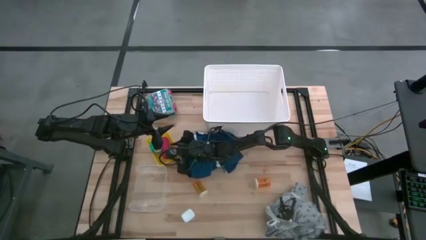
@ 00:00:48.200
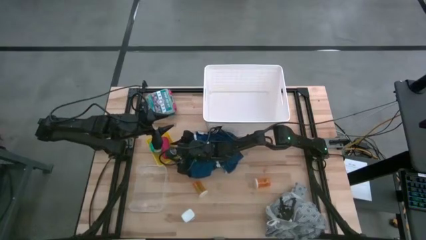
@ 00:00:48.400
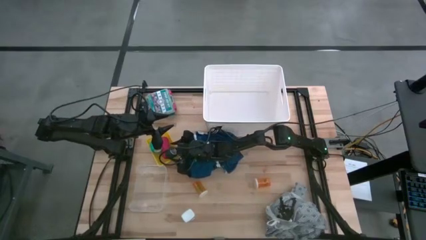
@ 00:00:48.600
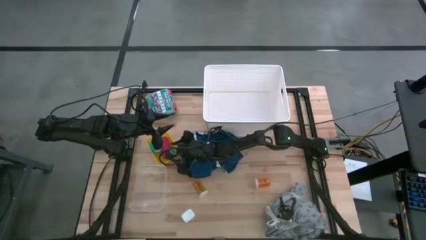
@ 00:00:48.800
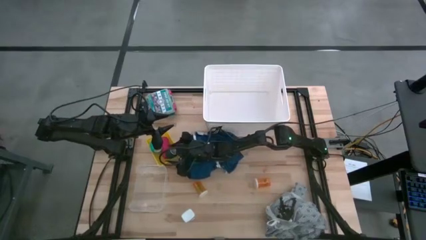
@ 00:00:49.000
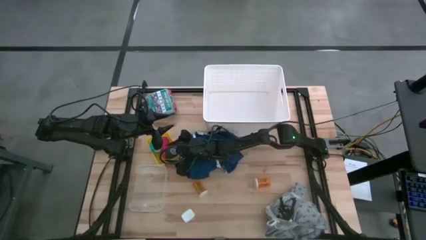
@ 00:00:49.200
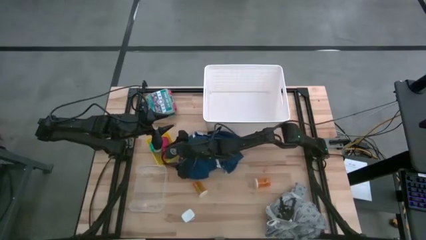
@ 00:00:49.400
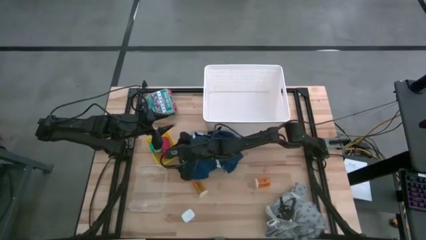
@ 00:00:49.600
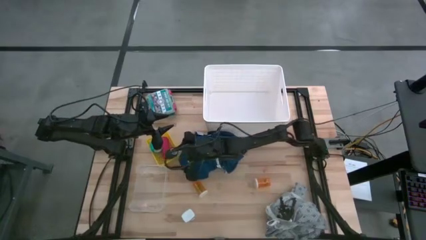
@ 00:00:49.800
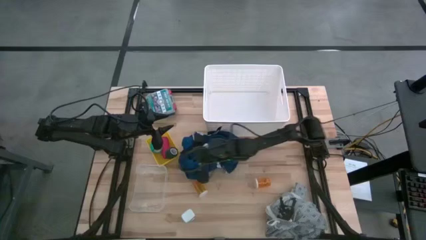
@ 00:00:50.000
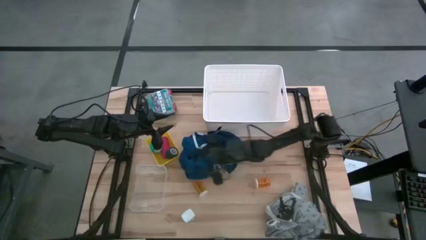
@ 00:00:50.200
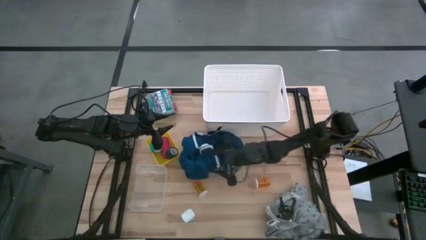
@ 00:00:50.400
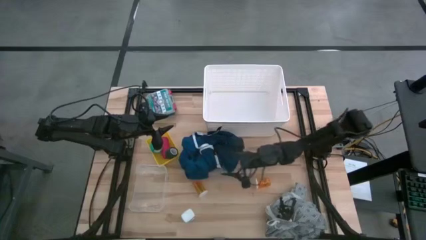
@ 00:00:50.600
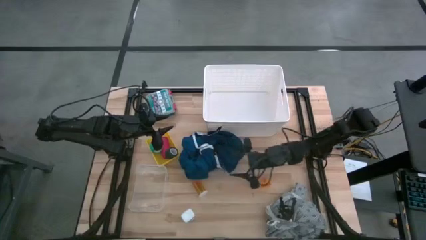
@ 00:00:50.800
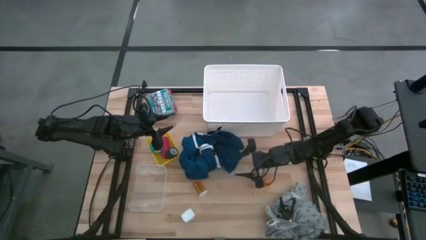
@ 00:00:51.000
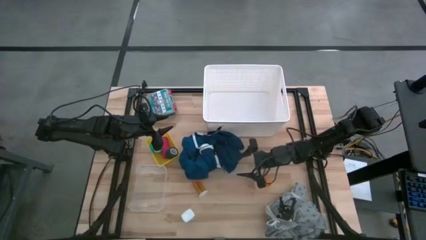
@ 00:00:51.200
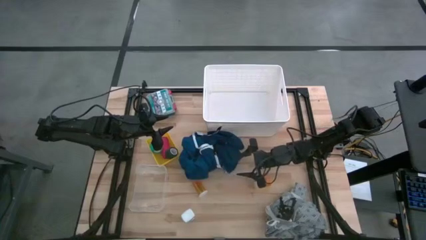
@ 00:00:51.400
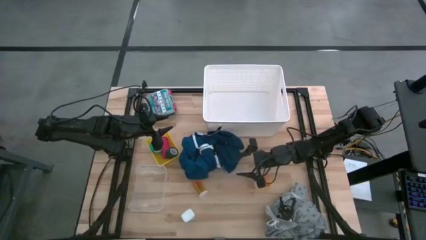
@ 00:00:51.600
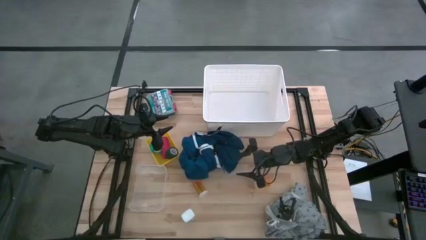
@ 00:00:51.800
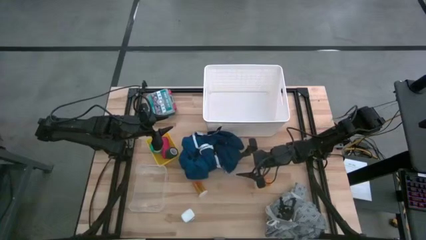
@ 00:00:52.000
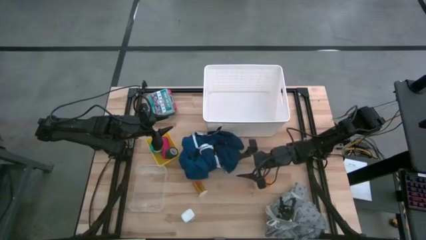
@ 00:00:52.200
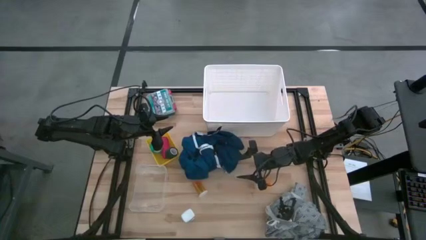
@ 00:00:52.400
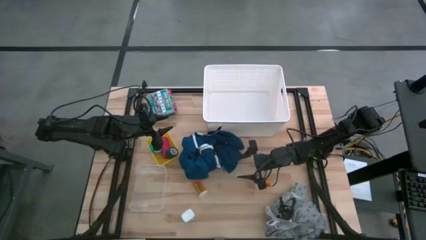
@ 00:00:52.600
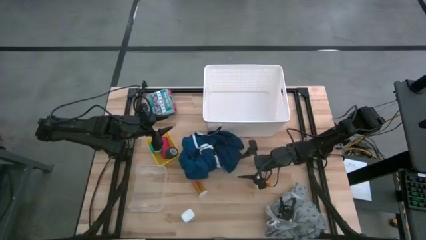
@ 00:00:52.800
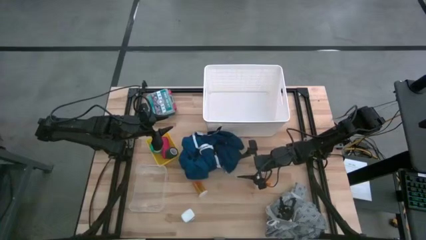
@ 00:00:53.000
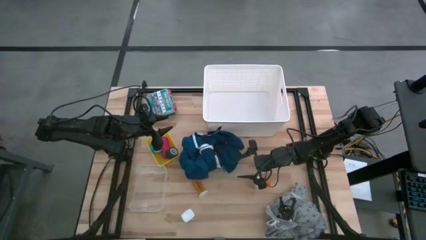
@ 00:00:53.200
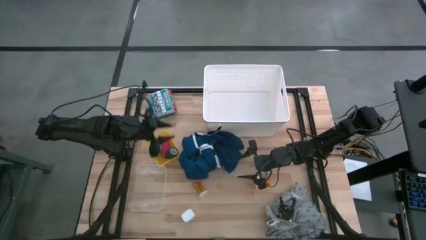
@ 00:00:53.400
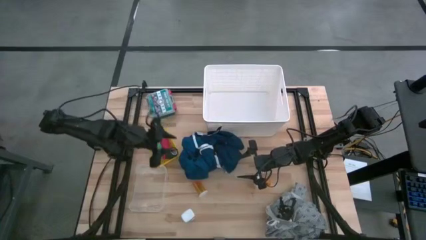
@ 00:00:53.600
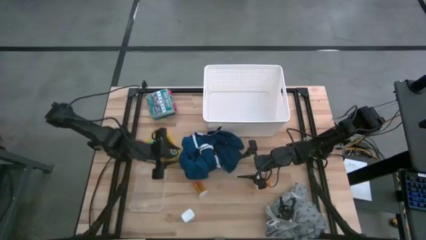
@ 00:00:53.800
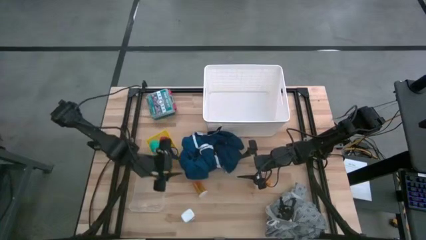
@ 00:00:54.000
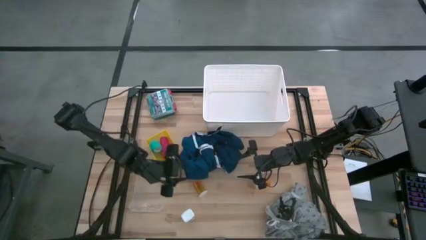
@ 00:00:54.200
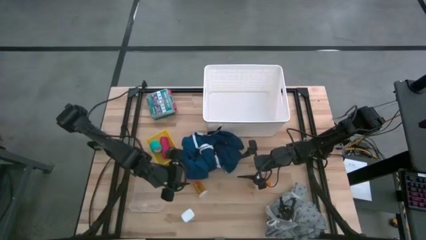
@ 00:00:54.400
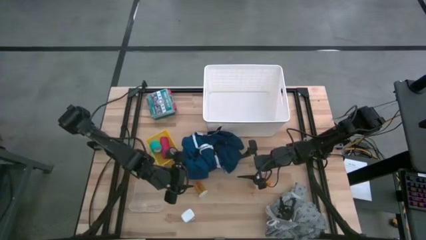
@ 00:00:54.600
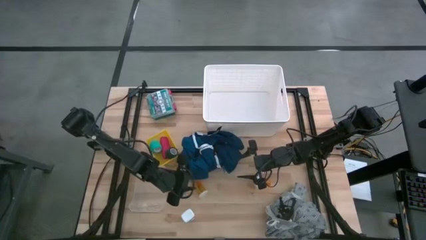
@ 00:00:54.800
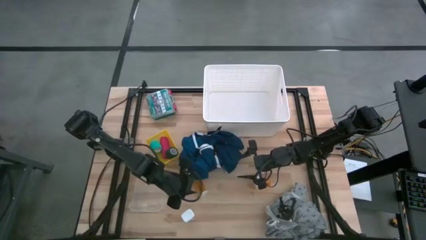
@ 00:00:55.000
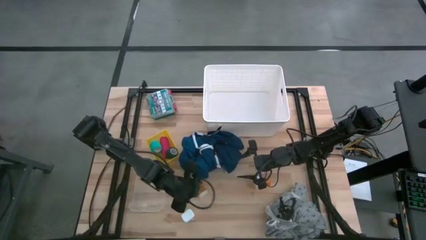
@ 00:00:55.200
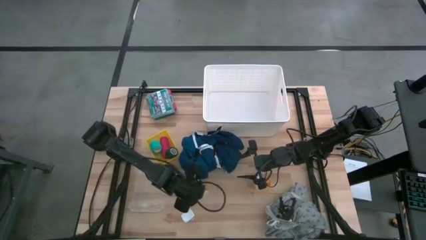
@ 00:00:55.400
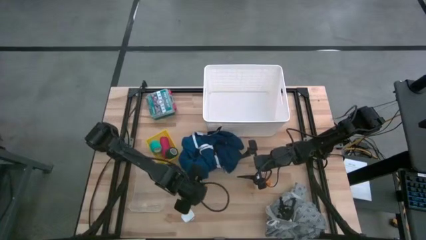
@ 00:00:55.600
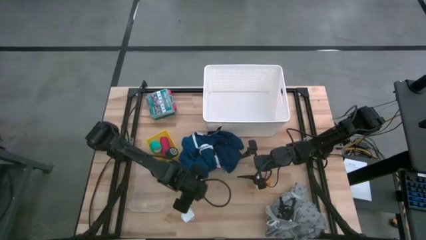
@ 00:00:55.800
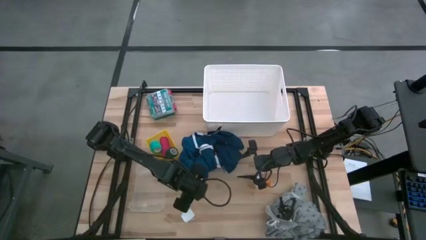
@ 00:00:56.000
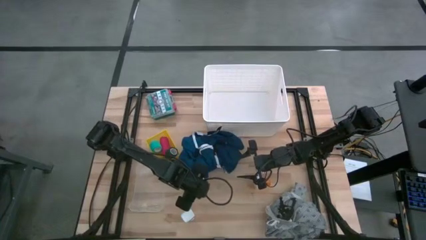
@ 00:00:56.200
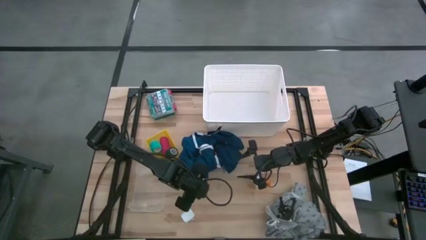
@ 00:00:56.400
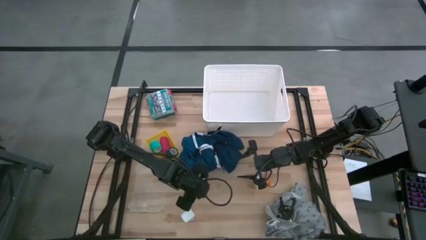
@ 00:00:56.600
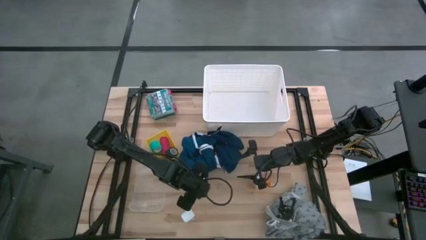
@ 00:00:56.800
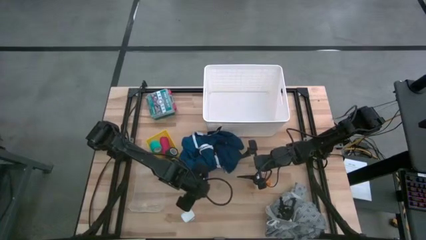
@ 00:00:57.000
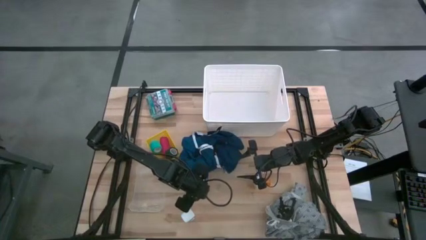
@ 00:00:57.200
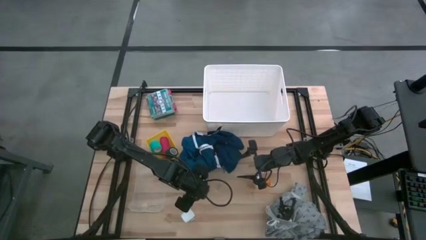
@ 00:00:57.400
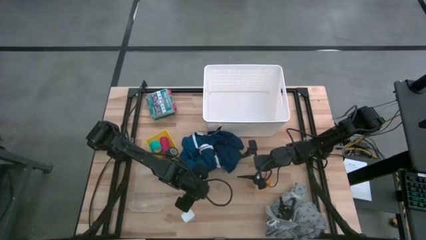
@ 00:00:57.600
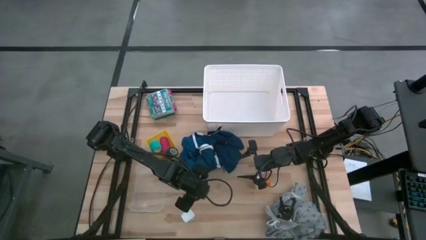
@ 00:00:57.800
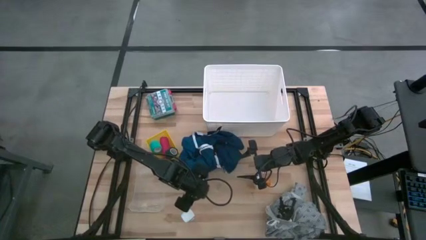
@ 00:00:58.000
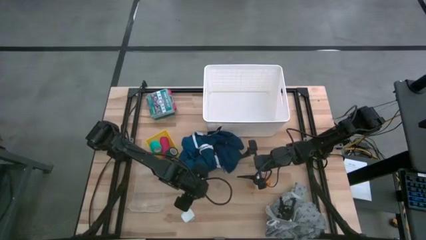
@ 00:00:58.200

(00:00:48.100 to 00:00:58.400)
Task: Pick & place medical supplies in basket/bin
Put the left orange pill bottle into the transparent bin
